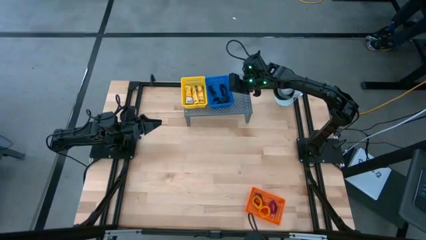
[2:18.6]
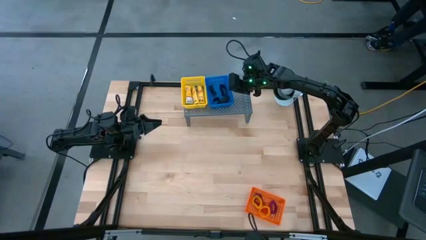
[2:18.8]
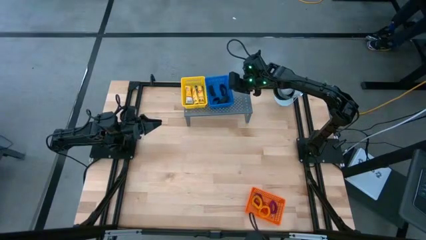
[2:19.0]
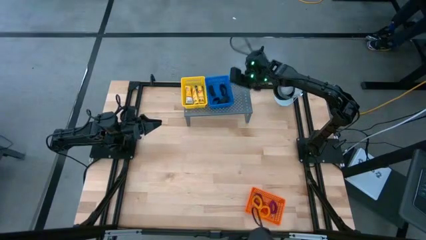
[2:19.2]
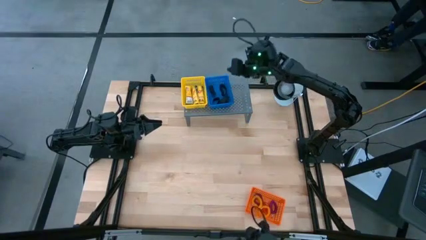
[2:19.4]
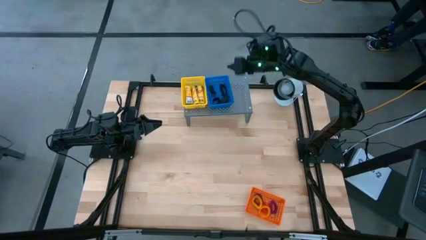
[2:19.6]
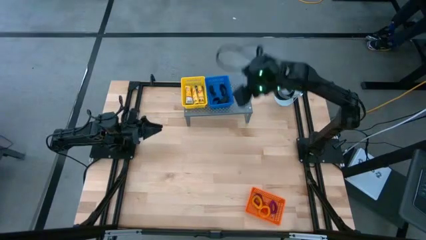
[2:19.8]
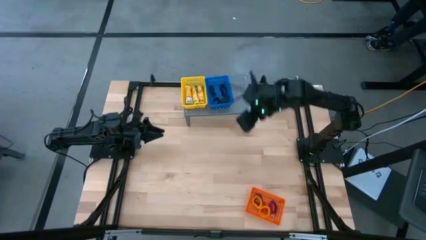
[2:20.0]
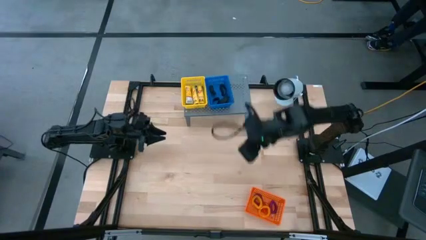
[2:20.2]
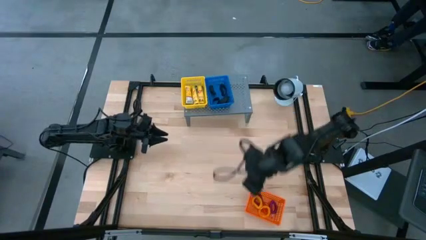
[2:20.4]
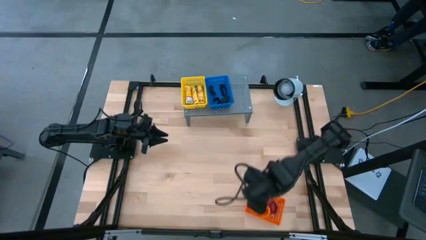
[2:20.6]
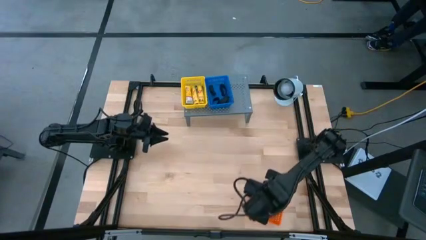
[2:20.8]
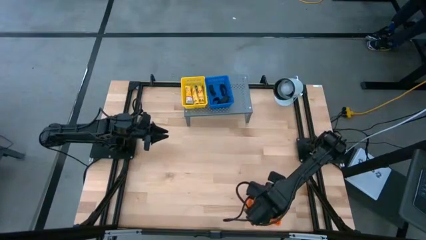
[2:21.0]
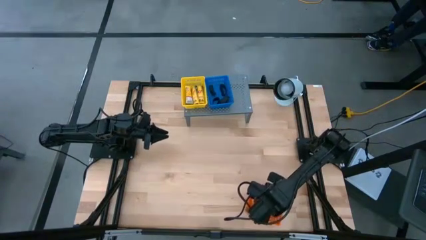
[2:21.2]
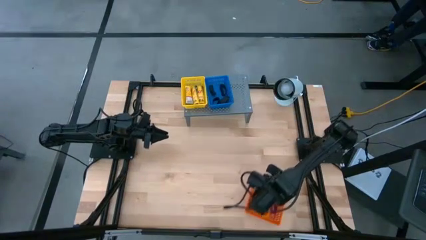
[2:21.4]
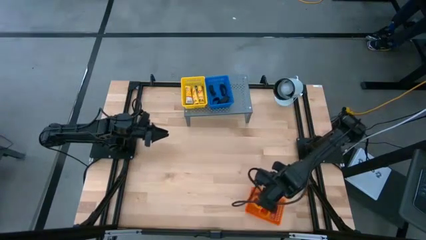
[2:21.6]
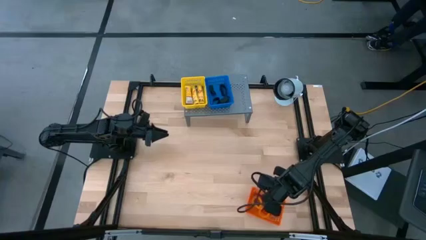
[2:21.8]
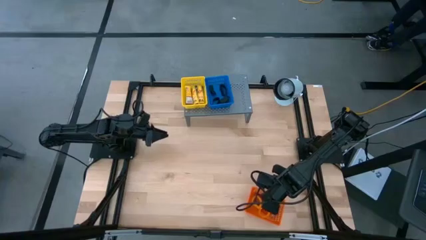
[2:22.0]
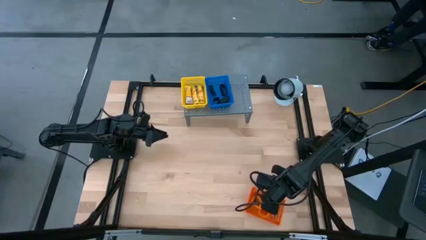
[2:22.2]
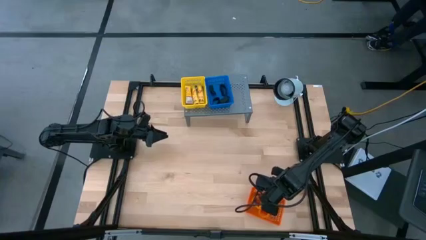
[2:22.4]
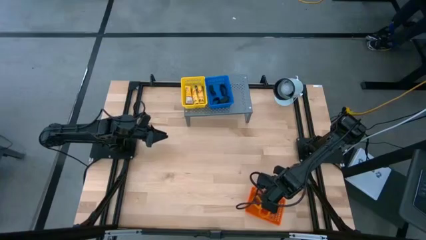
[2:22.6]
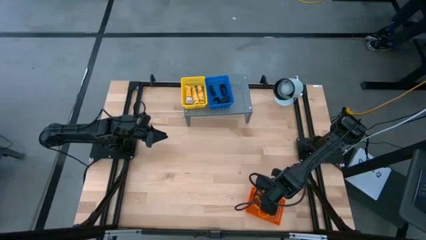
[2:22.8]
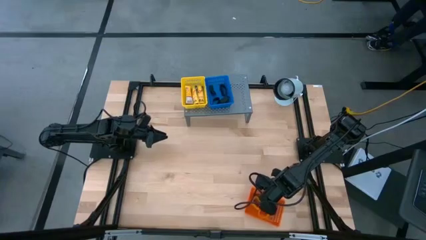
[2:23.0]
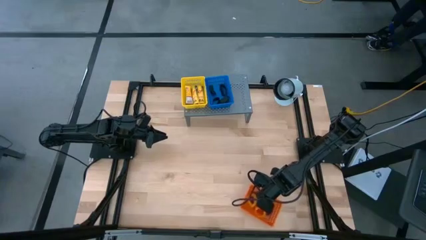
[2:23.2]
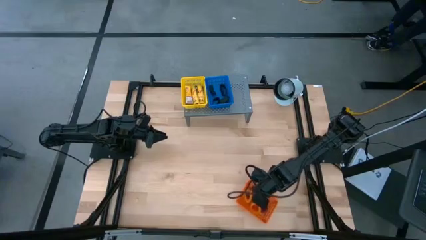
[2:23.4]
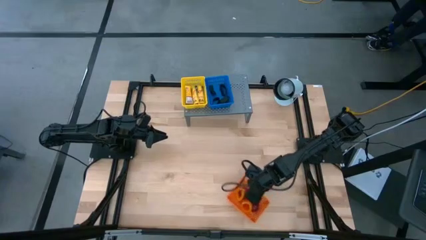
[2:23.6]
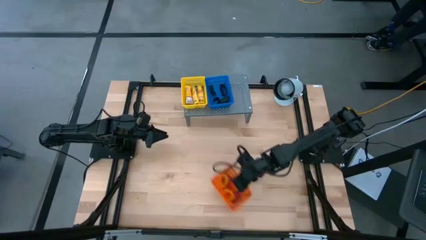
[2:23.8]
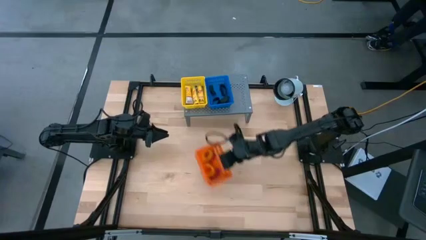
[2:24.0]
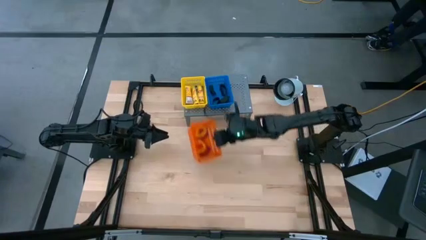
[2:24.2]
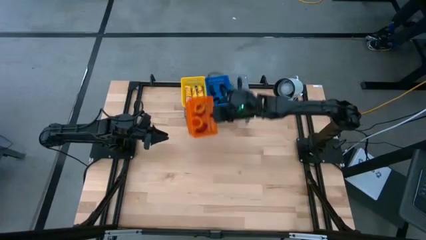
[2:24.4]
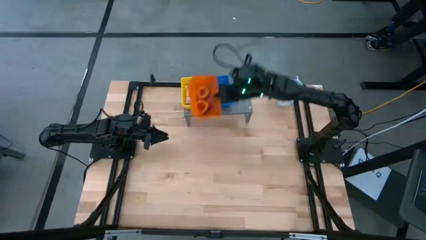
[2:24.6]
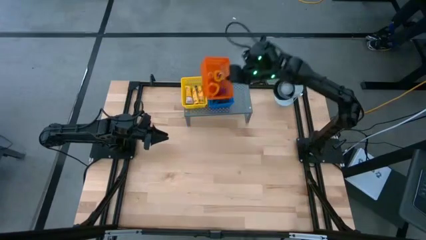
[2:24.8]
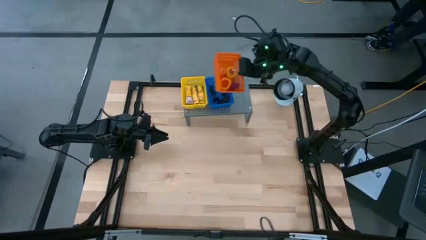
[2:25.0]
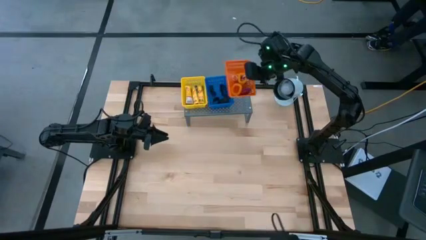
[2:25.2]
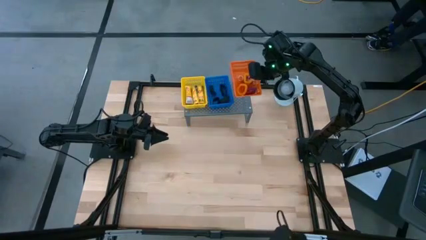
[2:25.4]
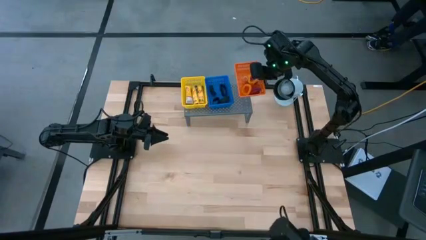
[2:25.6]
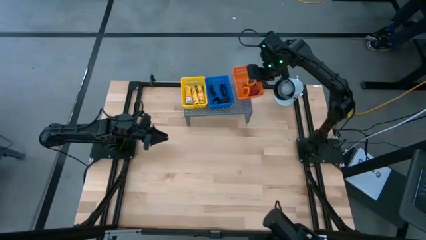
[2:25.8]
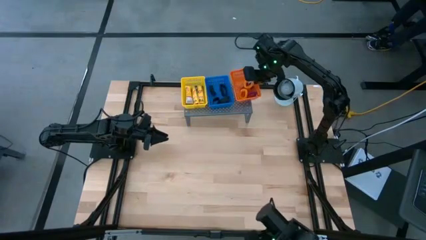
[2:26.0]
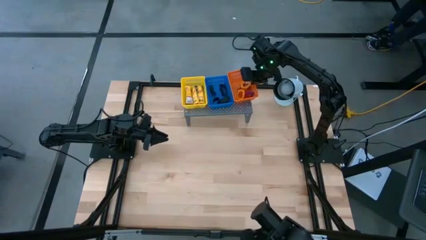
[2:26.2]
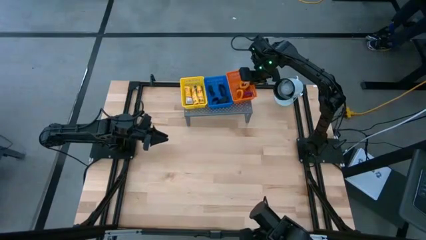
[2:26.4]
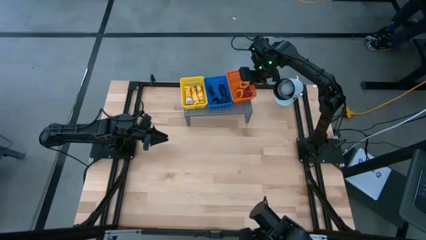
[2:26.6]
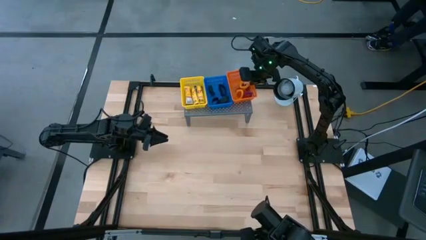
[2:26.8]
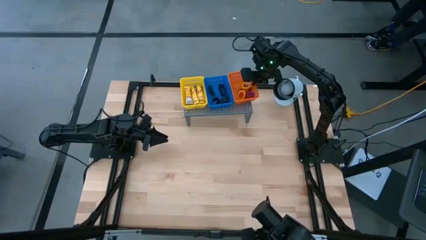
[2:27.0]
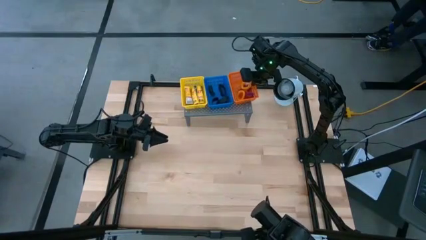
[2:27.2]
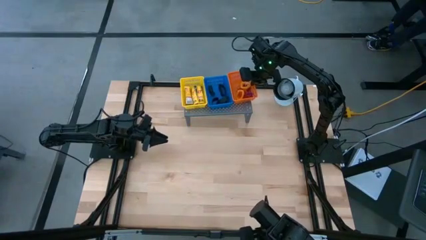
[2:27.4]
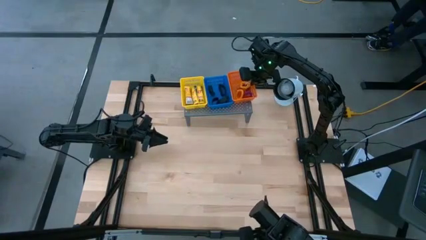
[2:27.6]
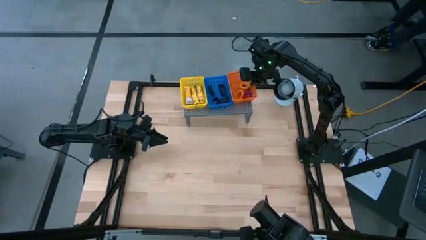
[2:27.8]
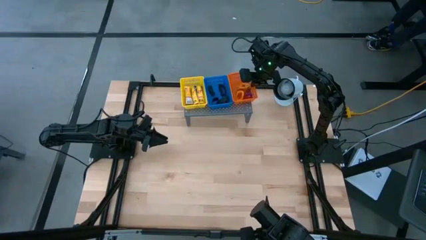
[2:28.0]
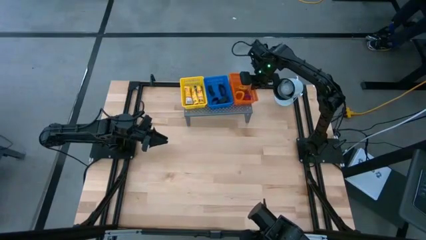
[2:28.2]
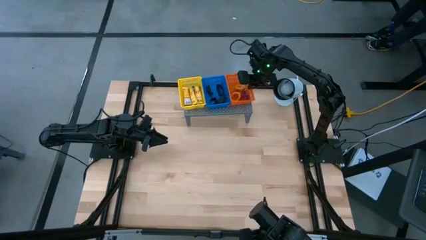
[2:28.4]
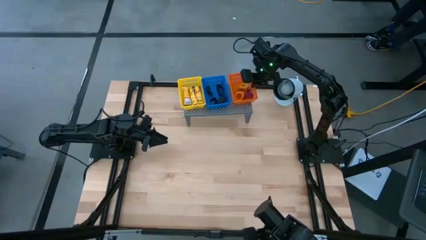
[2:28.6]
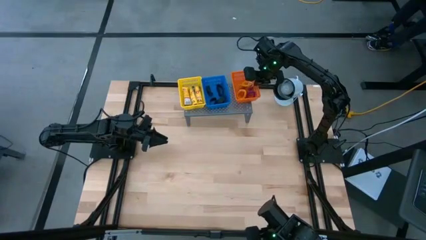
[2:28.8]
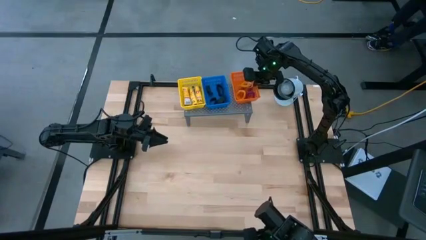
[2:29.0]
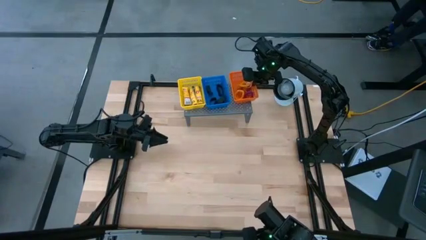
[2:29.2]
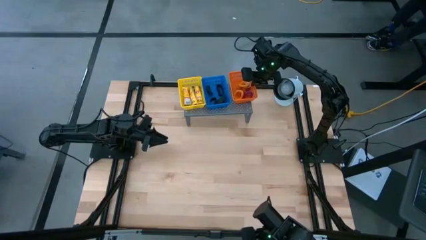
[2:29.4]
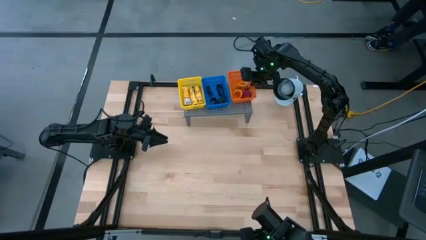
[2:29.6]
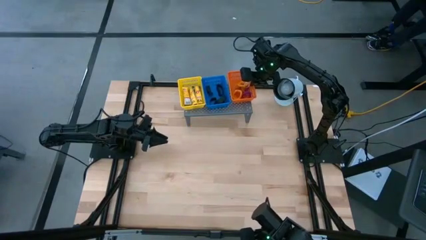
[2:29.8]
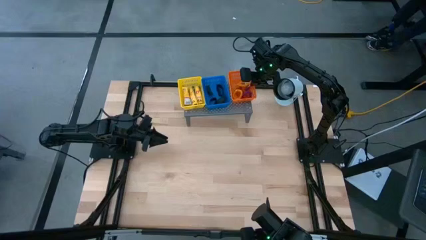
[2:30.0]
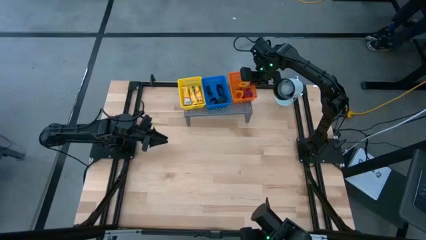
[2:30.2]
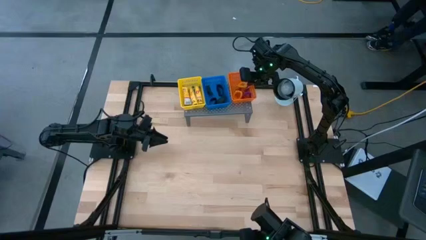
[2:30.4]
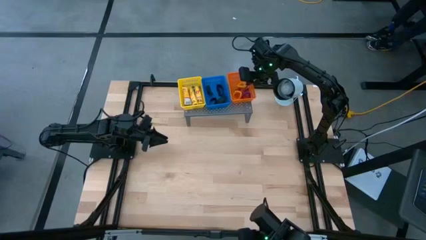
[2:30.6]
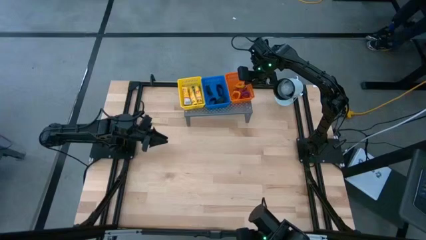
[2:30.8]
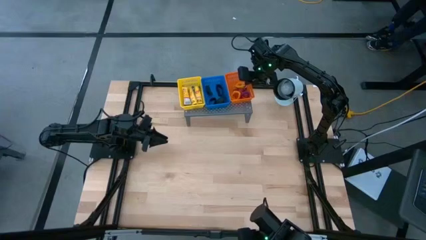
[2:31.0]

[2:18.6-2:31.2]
Task: Pick & Place Office Desk Supplies
Put the orange bin with the spring keychains on the shelf
